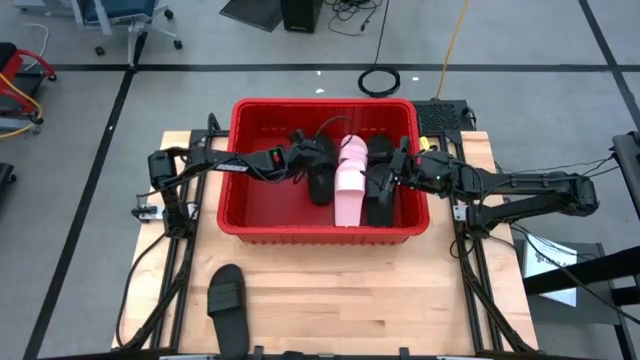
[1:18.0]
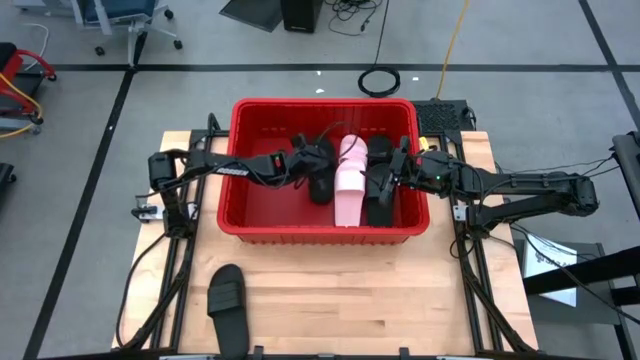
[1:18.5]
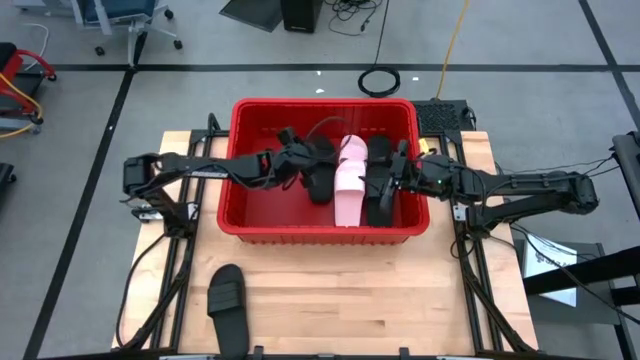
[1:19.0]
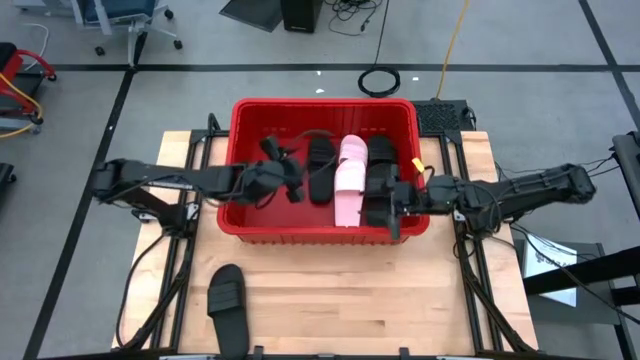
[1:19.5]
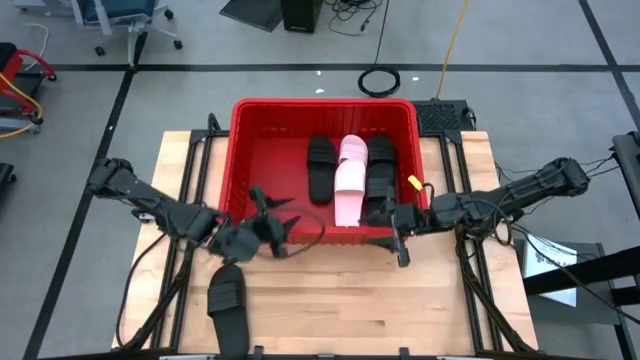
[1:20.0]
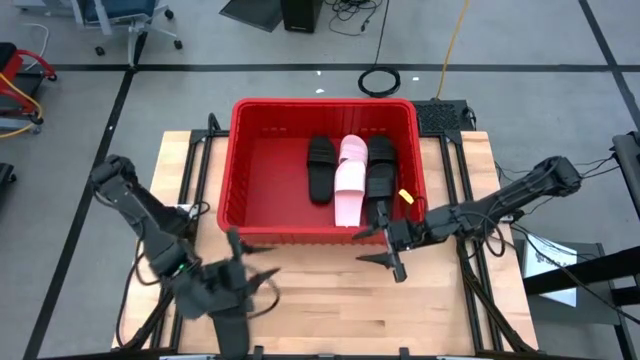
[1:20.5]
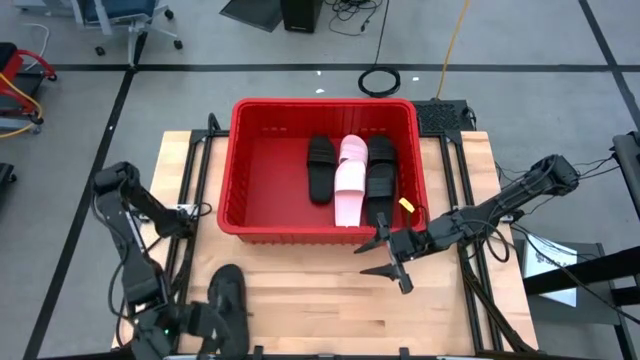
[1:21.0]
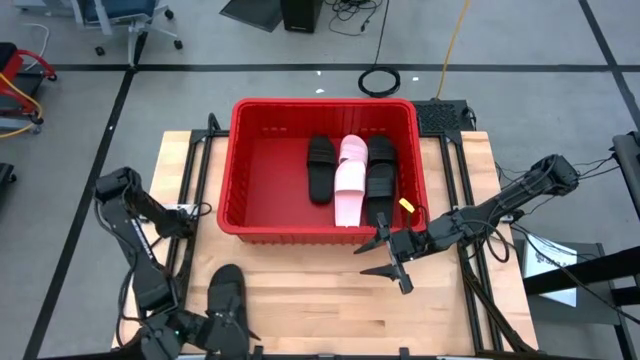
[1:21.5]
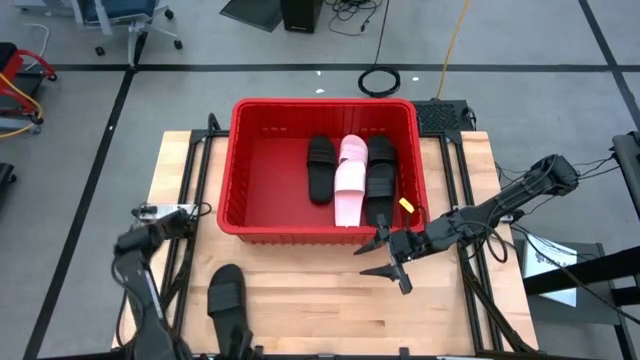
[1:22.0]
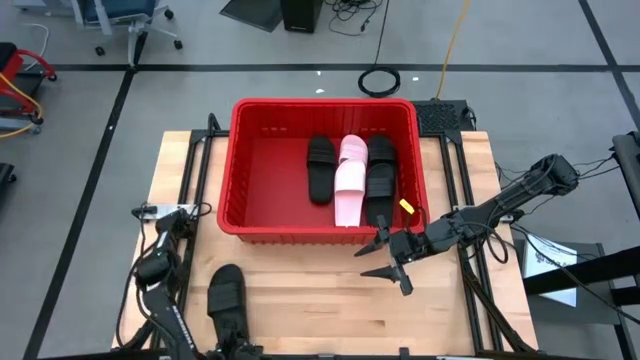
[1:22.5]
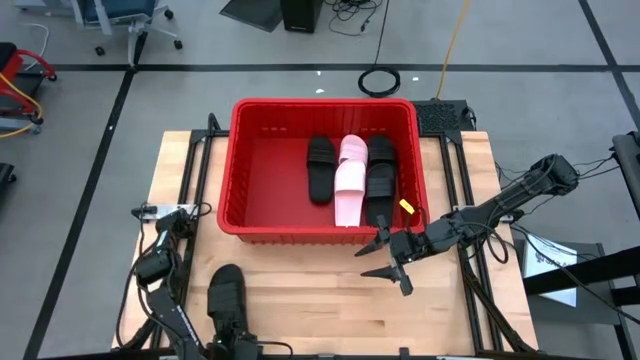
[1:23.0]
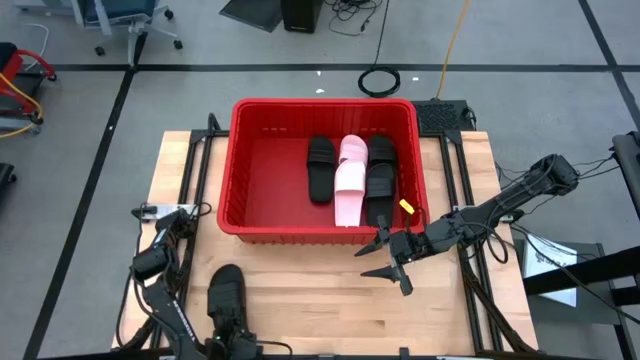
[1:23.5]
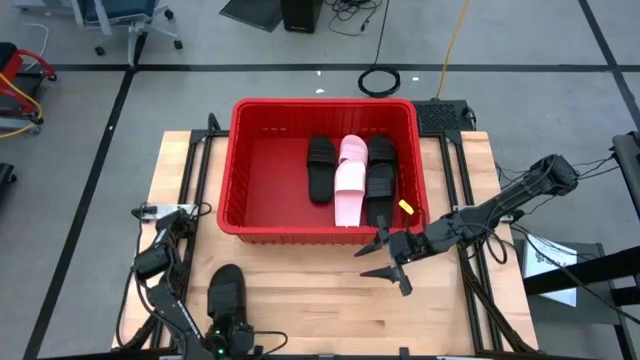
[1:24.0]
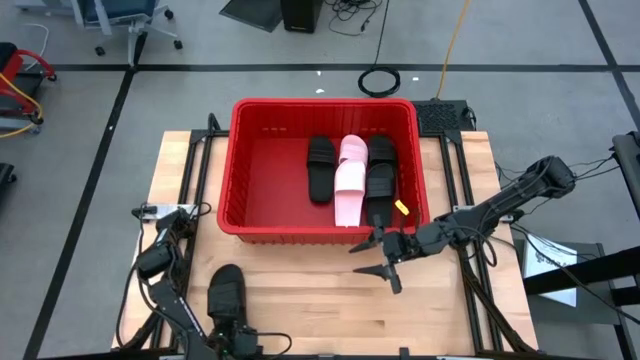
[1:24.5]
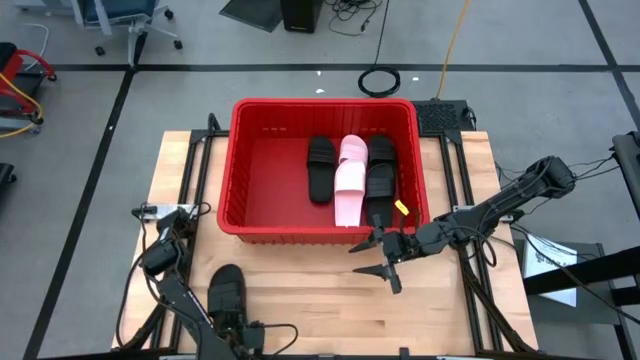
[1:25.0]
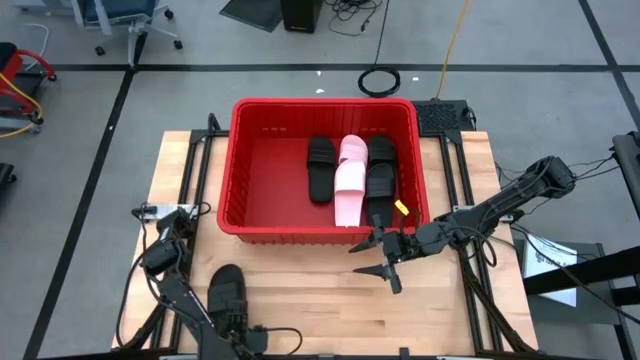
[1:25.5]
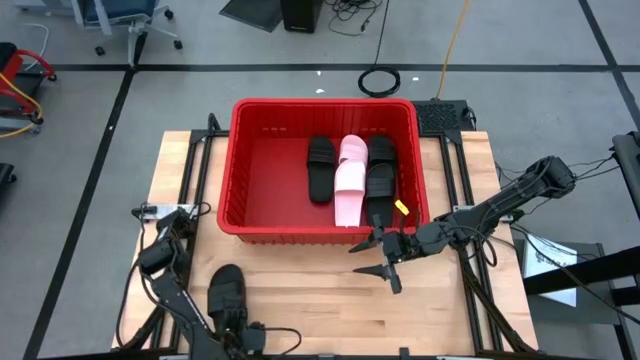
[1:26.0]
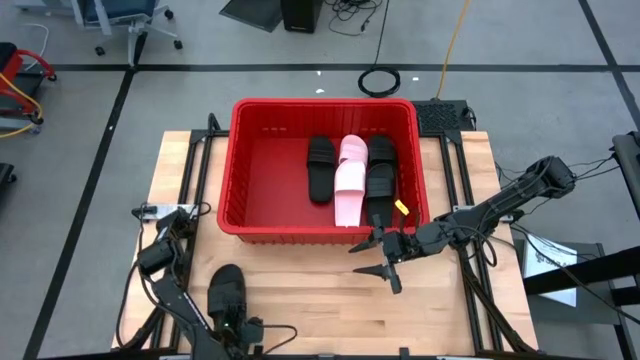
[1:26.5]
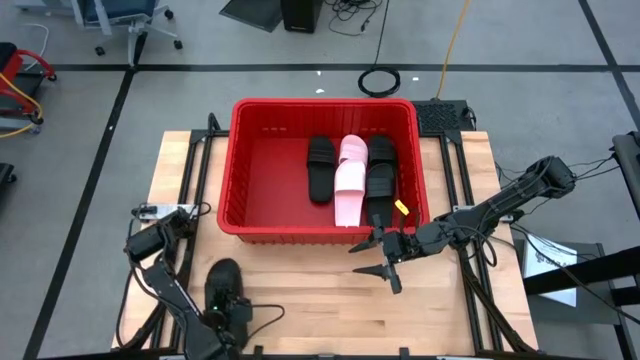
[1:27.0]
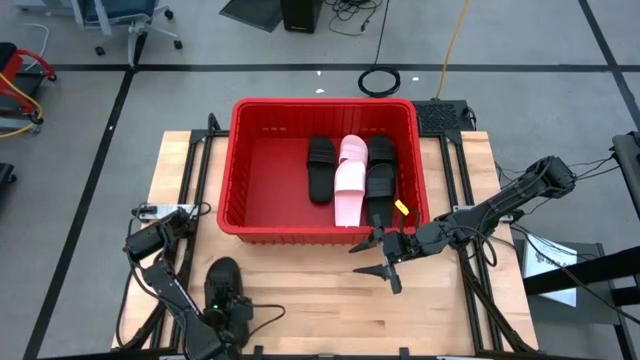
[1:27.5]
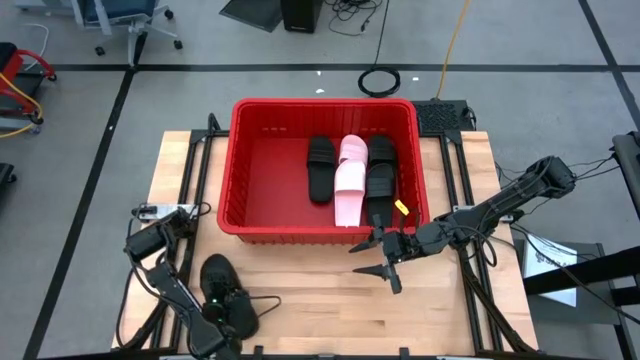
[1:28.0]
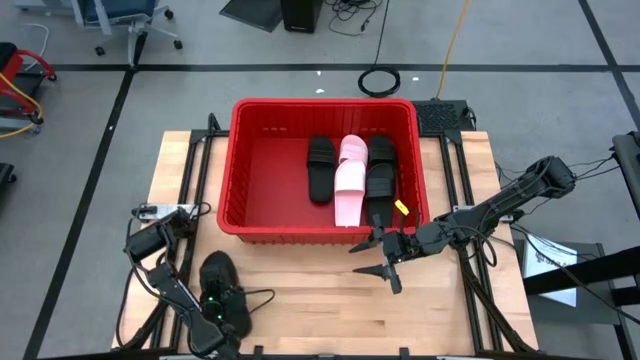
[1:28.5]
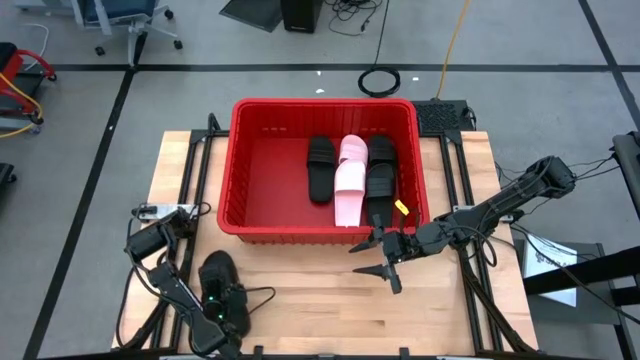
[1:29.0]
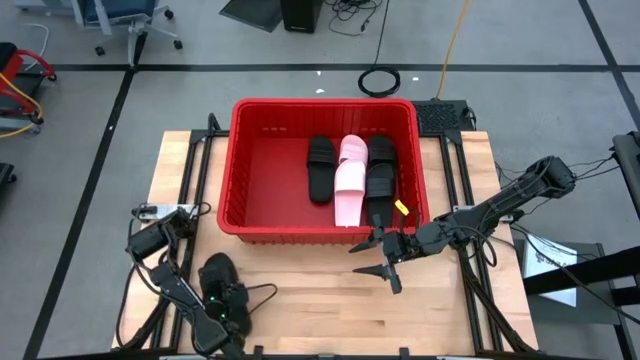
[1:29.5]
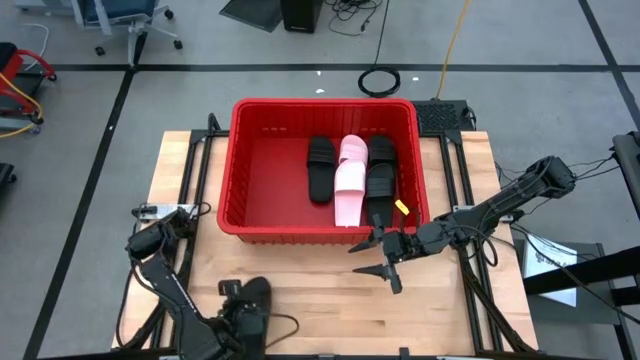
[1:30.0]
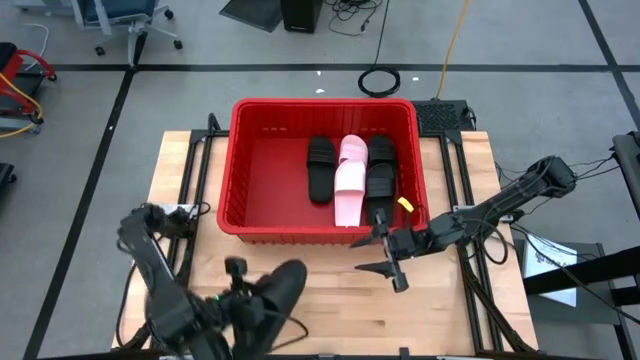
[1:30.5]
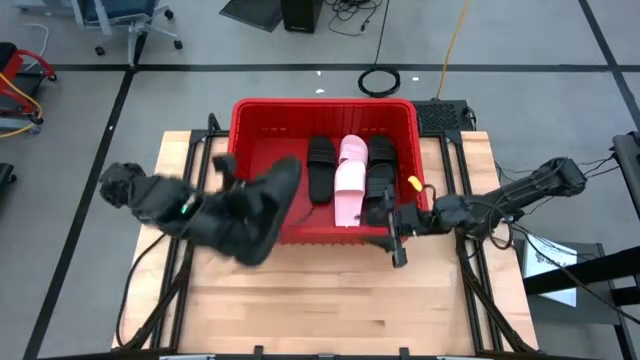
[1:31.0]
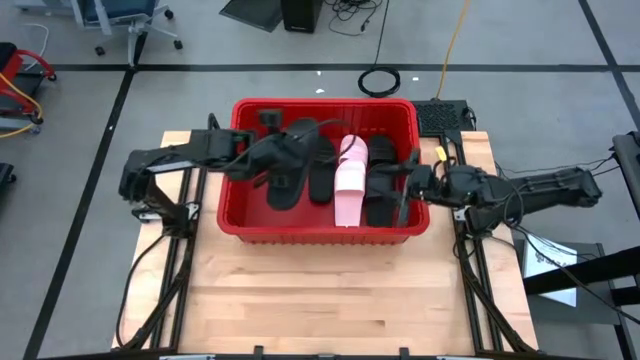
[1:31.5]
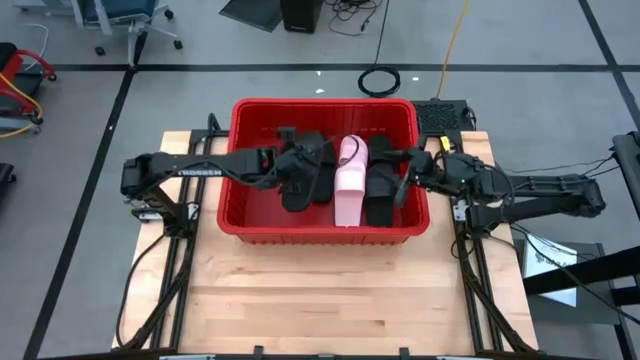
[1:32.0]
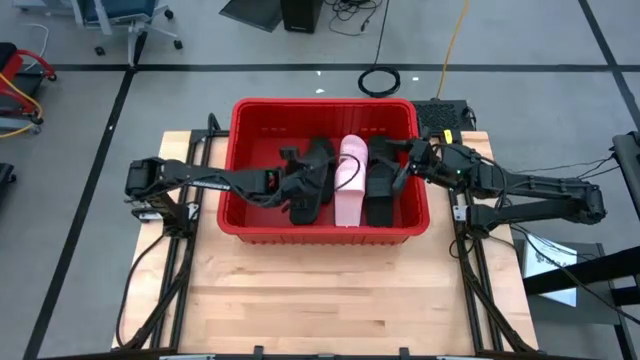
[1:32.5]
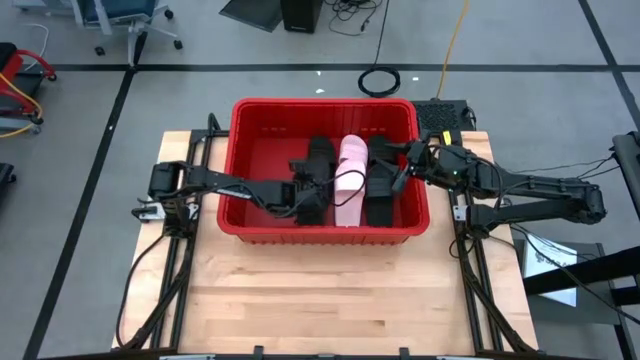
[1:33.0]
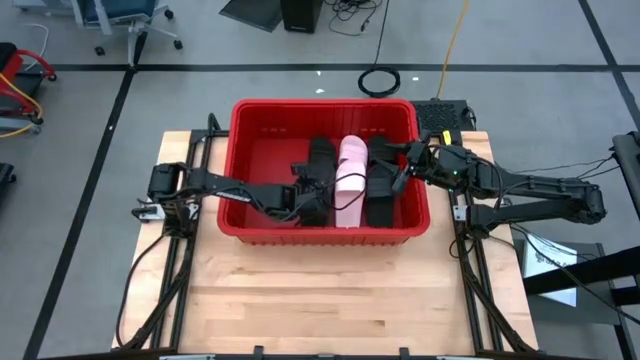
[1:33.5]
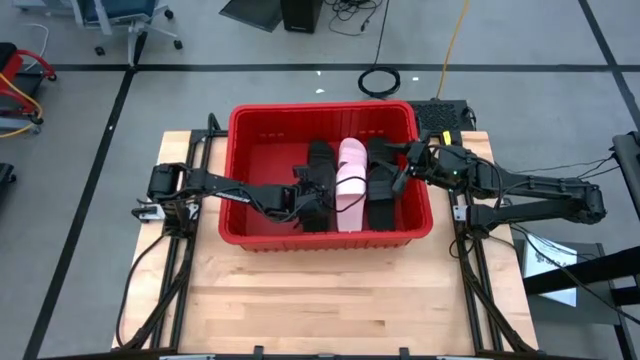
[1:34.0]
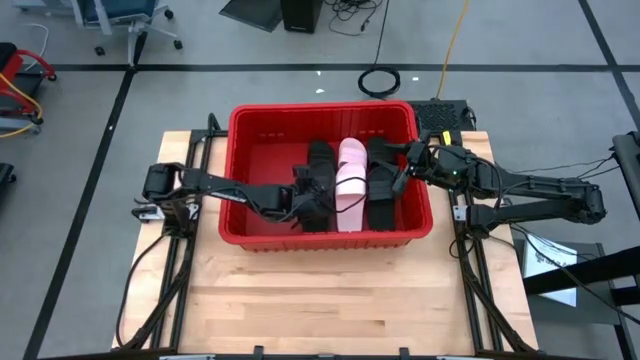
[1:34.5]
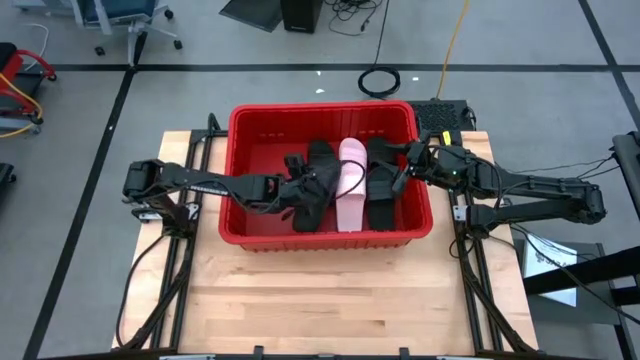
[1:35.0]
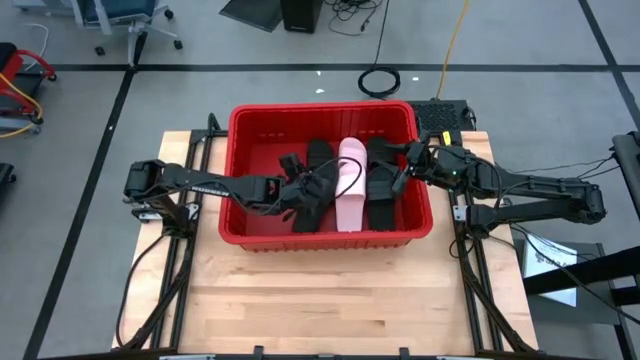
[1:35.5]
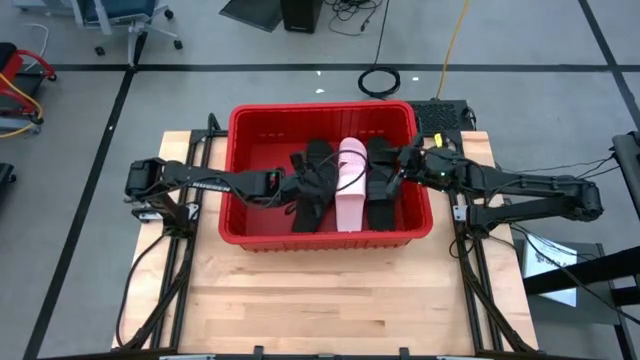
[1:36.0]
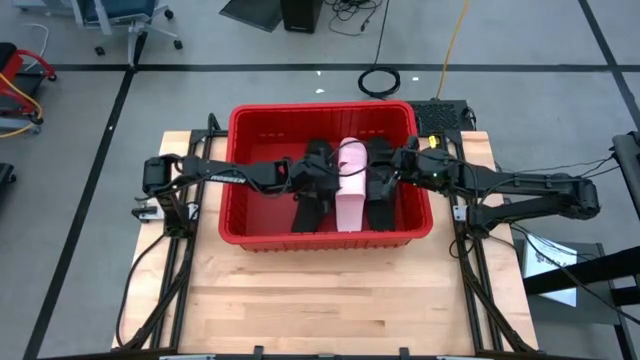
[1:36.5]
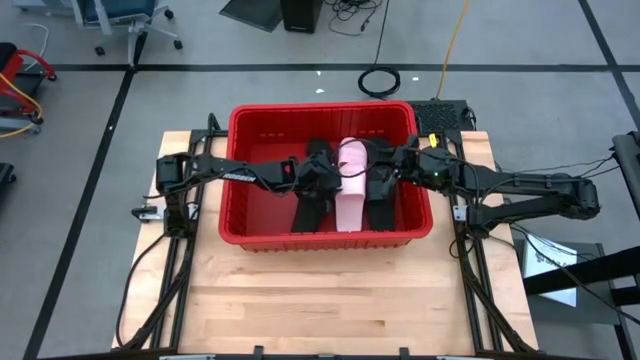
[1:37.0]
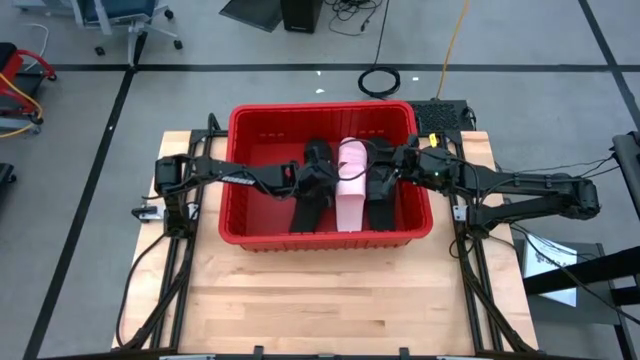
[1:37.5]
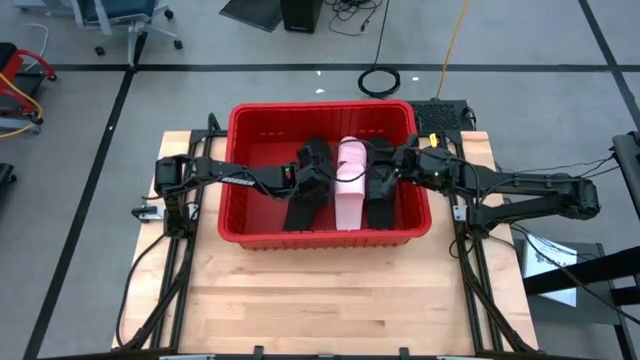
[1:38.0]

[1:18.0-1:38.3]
Task: Pick and place slides into bin
Put the black slide into the red bin
